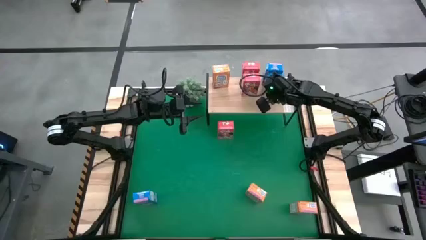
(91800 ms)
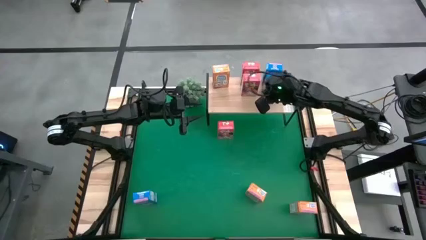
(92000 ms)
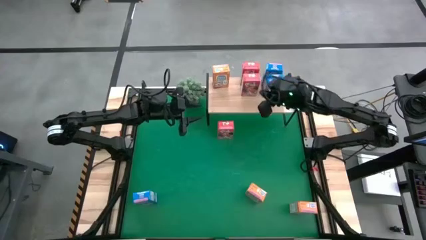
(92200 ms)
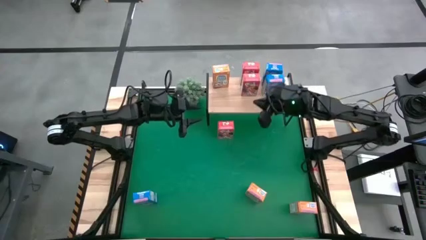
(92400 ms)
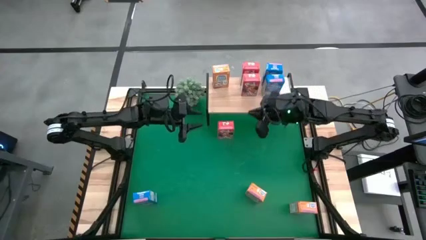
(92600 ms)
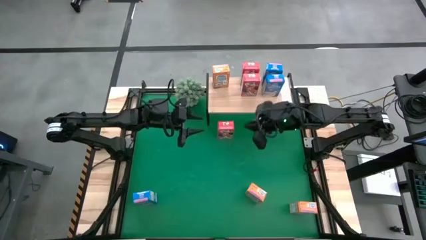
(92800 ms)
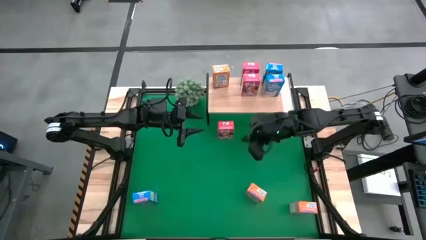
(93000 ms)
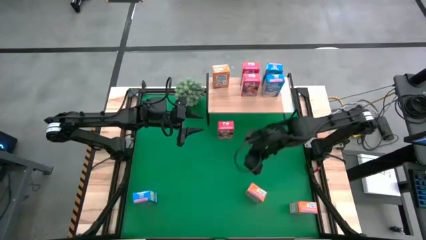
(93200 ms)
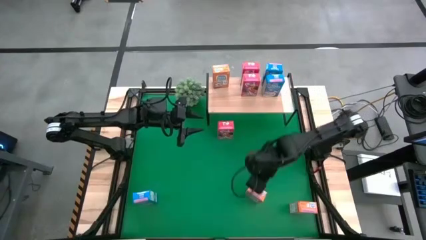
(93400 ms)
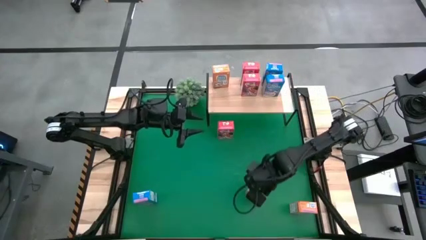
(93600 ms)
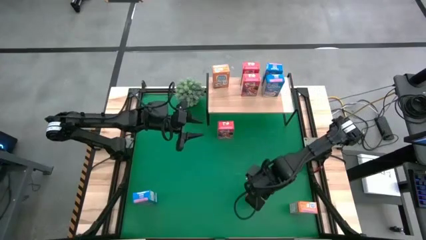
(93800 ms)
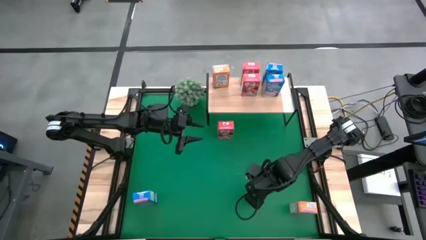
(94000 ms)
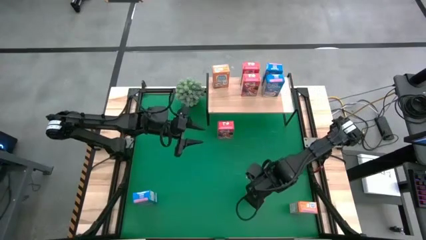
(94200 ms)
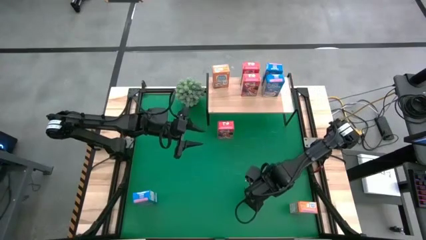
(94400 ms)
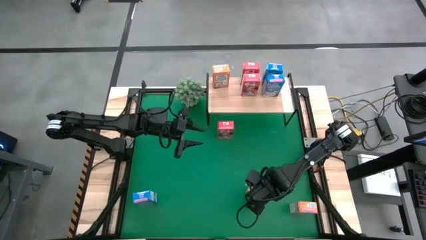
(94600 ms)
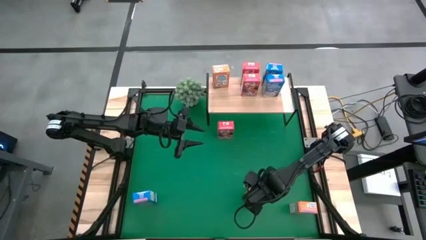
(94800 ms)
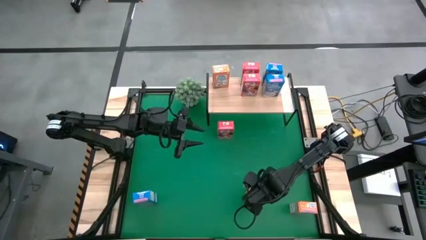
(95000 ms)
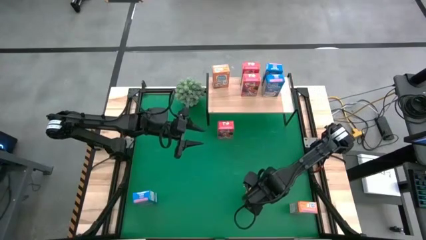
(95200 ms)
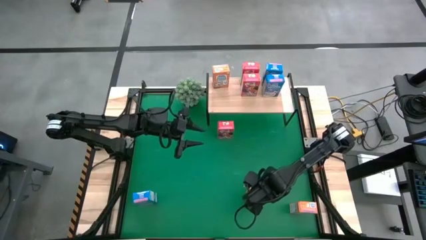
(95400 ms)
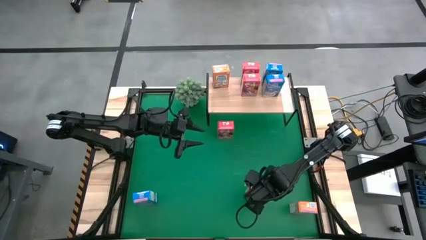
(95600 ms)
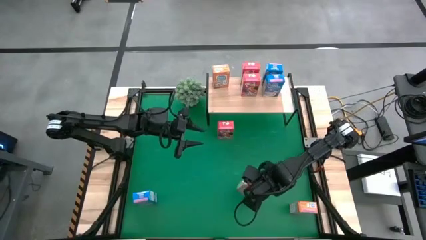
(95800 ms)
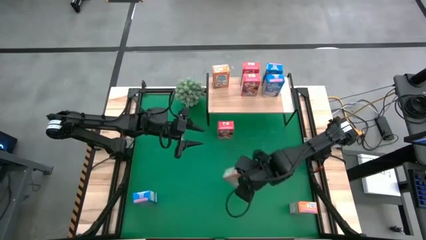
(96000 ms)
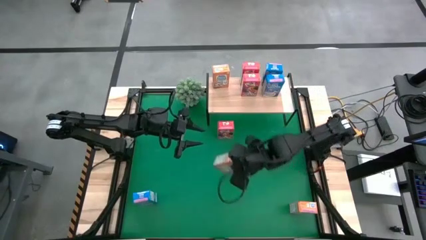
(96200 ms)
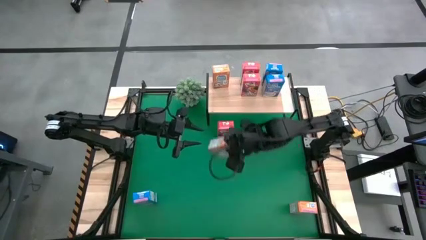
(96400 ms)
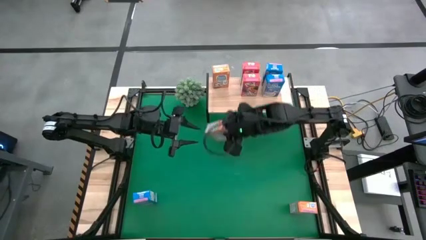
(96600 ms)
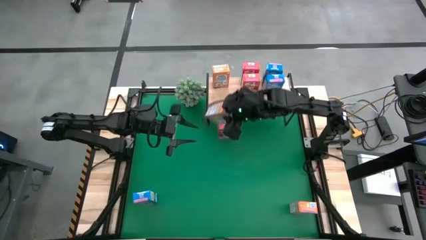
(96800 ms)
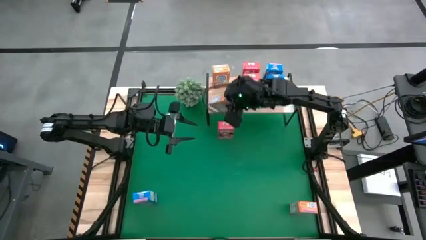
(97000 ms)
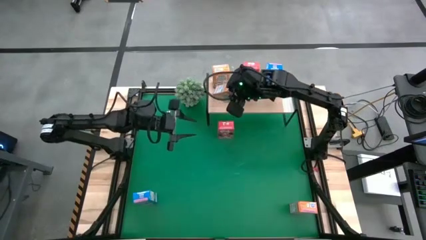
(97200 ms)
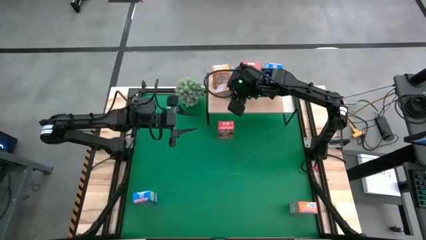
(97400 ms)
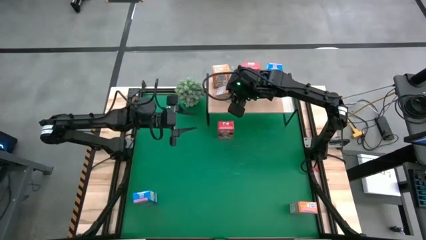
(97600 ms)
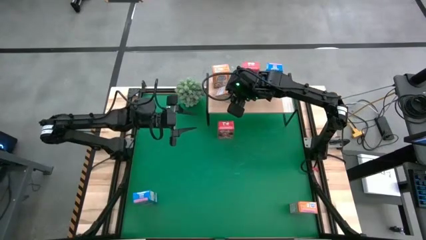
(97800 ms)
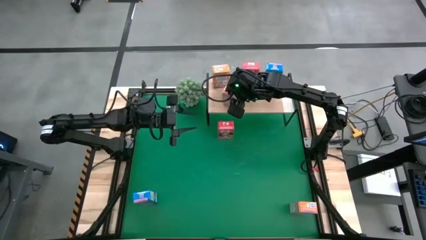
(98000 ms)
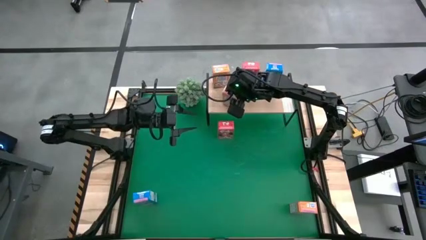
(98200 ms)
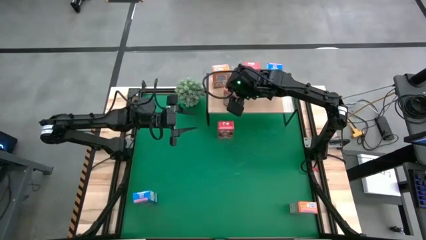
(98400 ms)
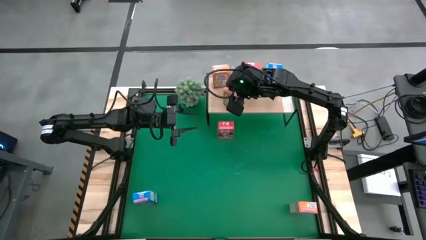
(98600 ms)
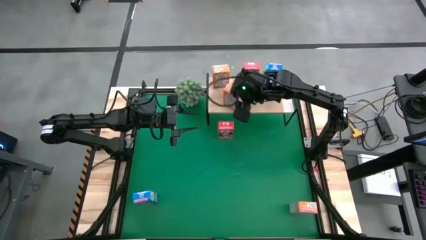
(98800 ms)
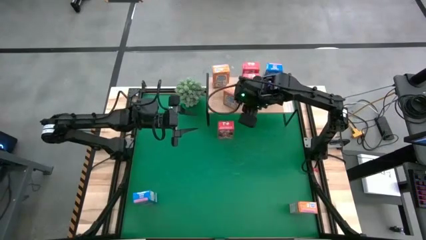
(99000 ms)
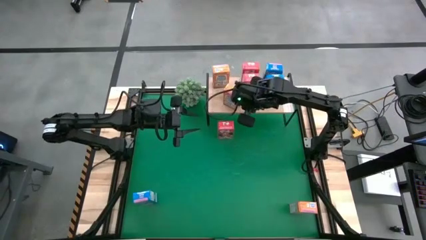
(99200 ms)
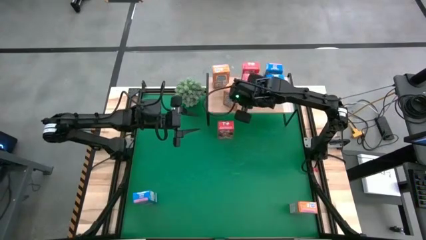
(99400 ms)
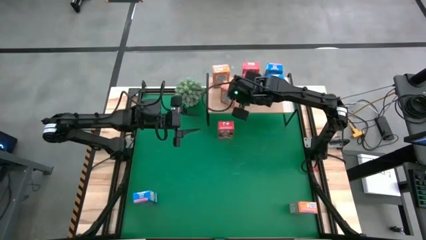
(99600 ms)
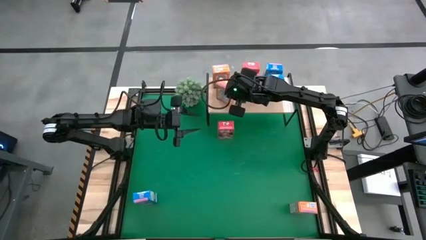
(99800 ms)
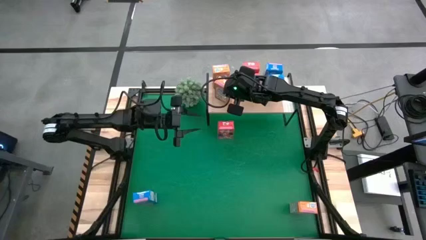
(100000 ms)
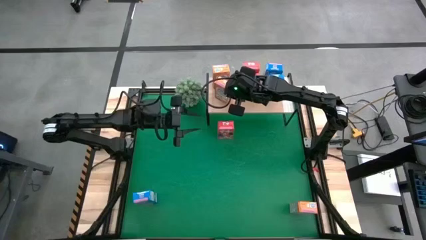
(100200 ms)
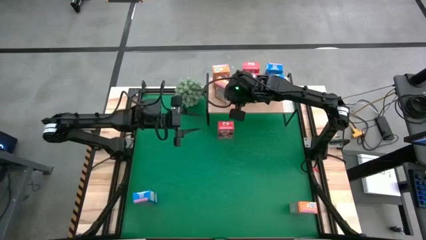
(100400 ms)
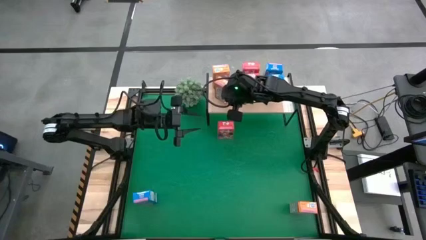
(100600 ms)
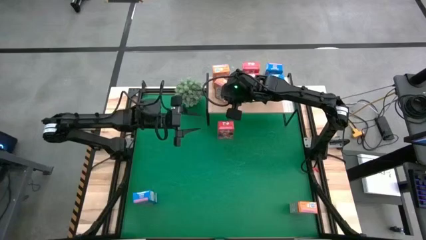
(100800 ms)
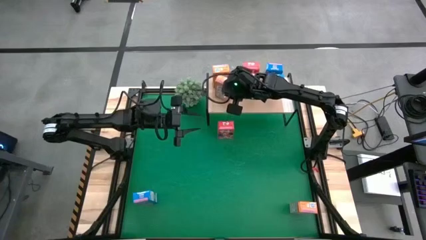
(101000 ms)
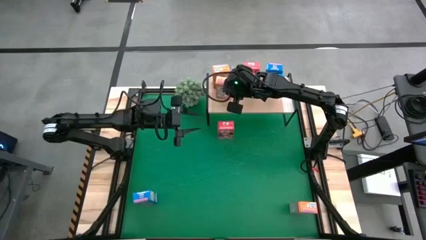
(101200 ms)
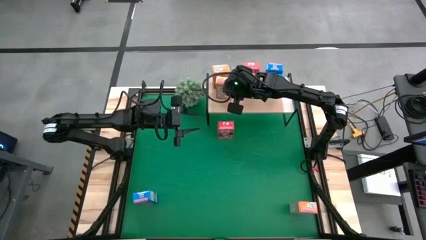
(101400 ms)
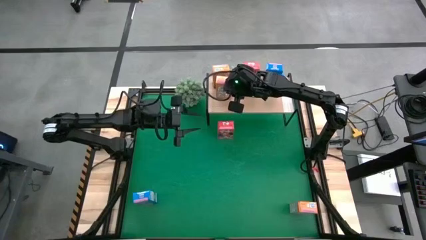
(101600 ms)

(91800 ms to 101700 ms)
Task: Stack cereal on shelf
Put the left orange cereal box on the shelf aligned with the other orange cereal box

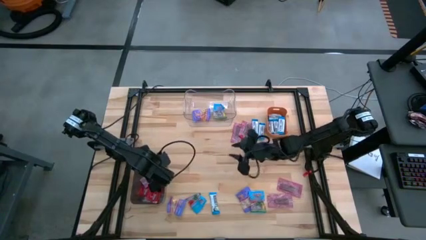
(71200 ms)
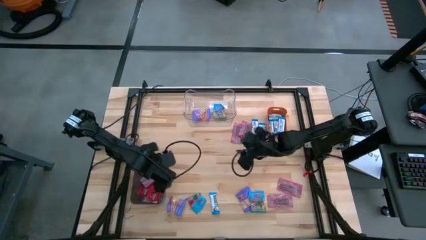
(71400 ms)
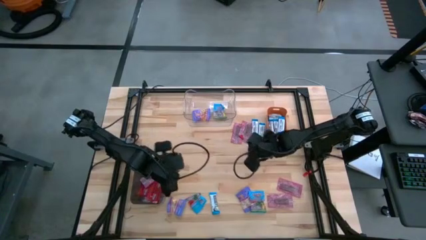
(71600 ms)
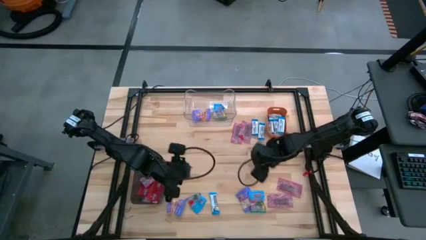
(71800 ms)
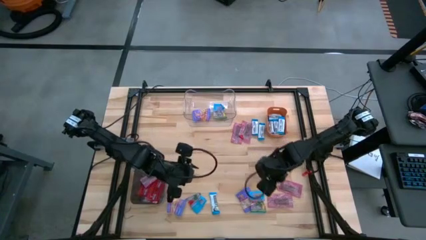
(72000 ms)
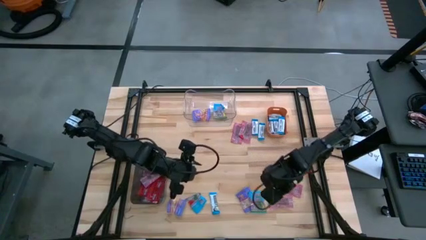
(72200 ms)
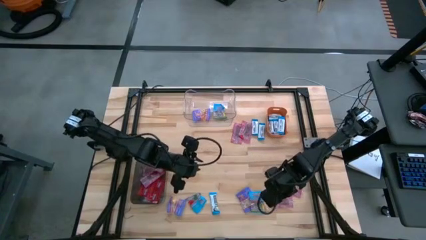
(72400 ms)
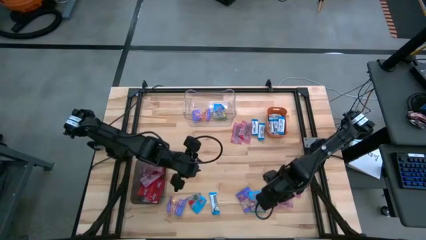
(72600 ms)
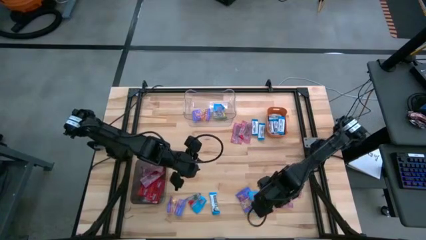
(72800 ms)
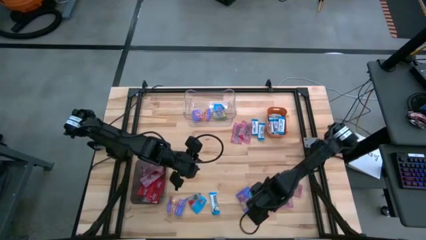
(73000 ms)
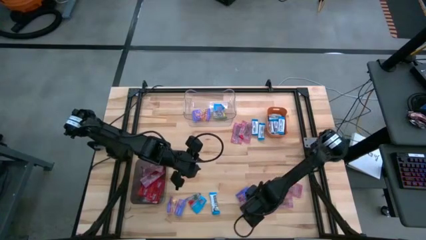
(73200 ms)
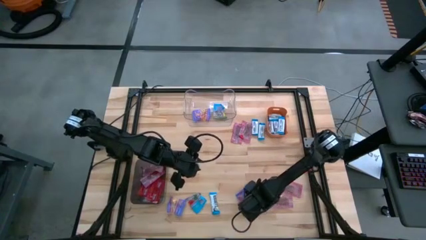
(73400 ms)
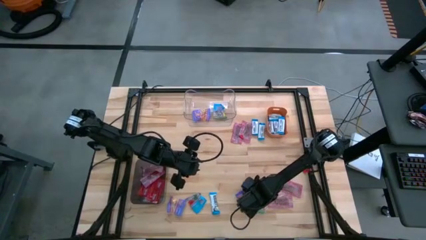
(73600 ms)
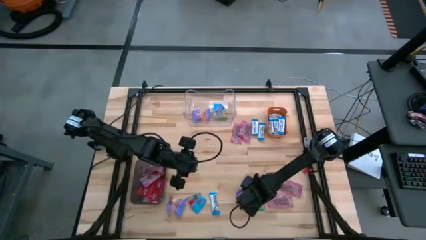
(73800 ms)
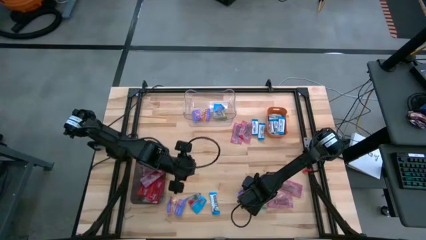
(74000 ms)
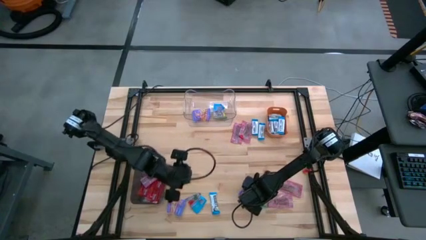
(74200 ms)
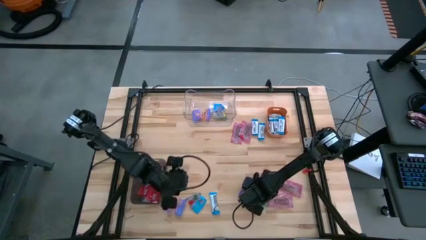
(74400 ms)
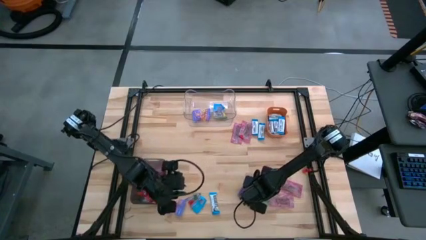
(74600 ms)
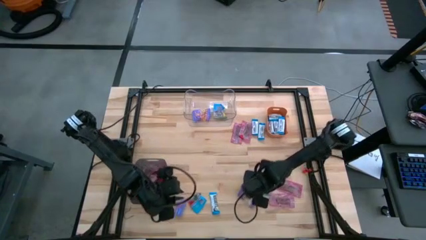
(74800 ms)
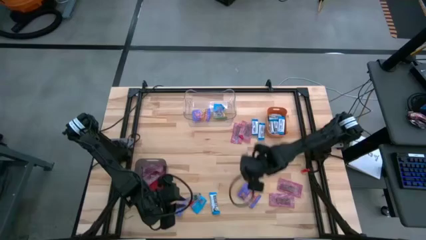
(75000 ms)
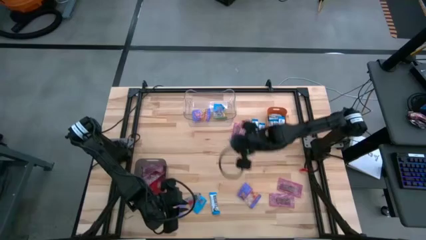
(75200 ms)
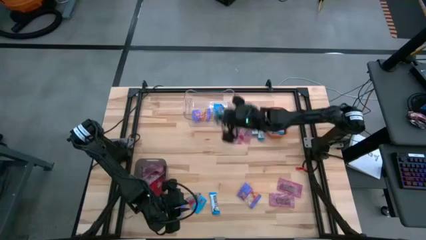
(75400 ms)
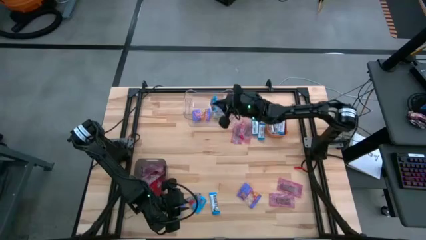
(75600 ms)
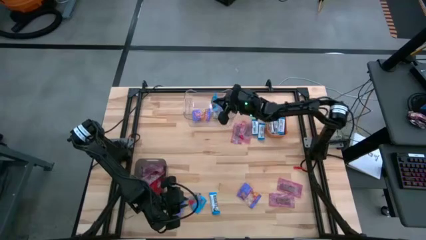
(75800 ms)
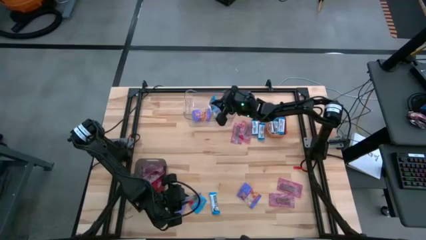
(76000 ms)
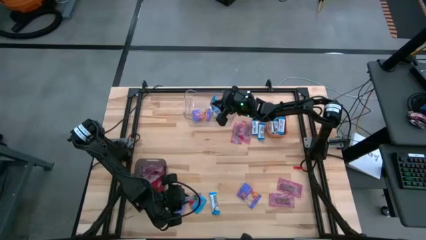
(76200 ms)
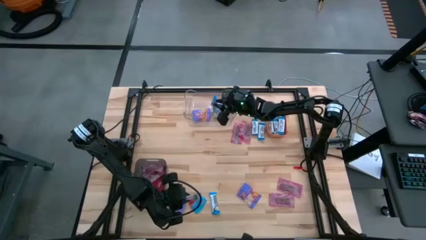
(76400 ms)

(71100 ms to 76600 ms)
Task: Sort candy
Put the light blue gummy into the transparent bin
